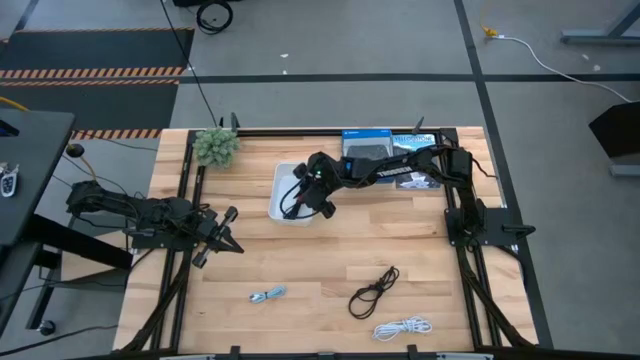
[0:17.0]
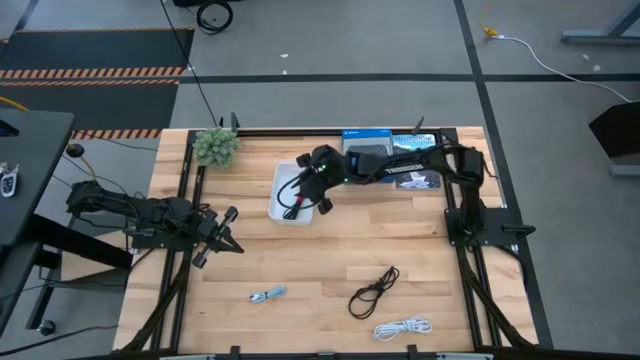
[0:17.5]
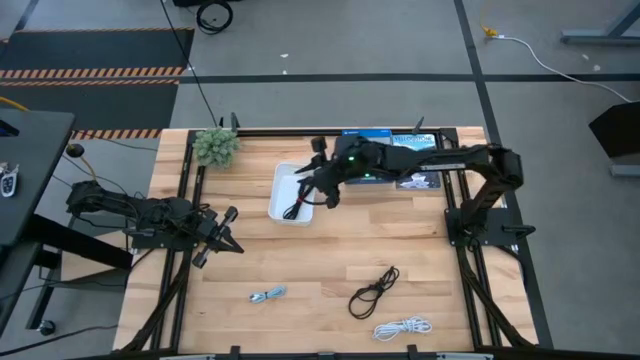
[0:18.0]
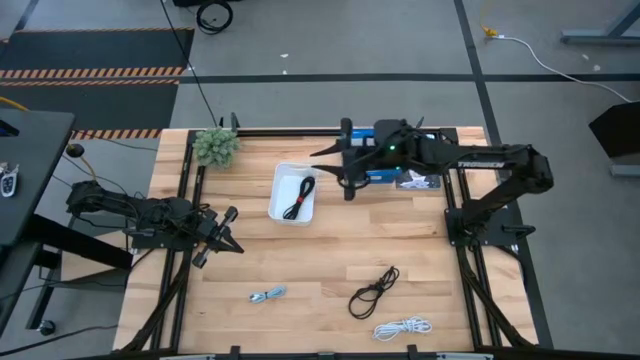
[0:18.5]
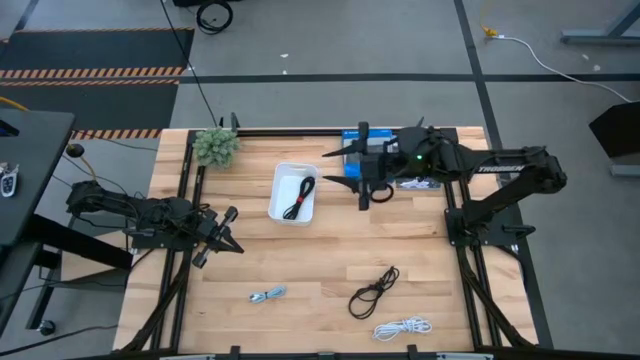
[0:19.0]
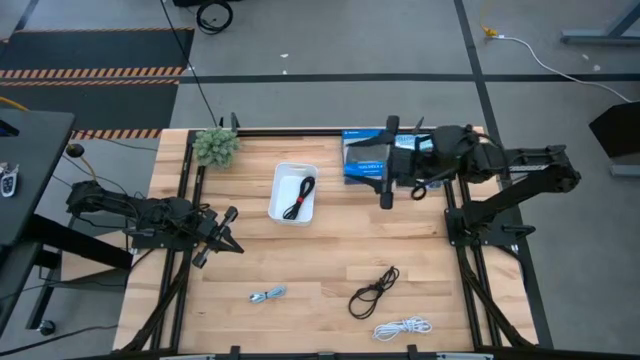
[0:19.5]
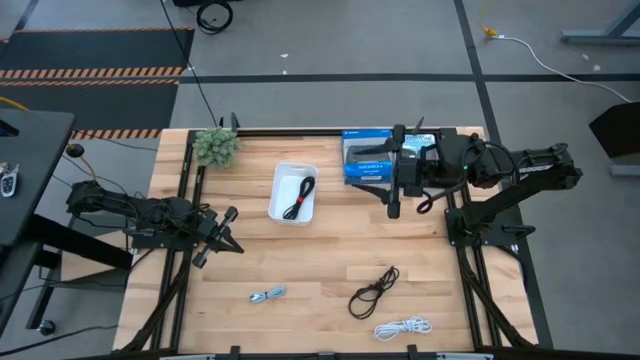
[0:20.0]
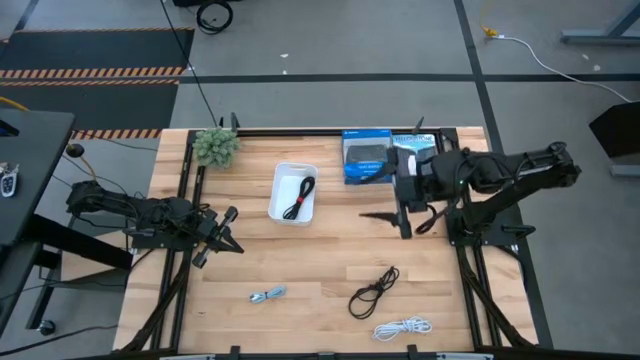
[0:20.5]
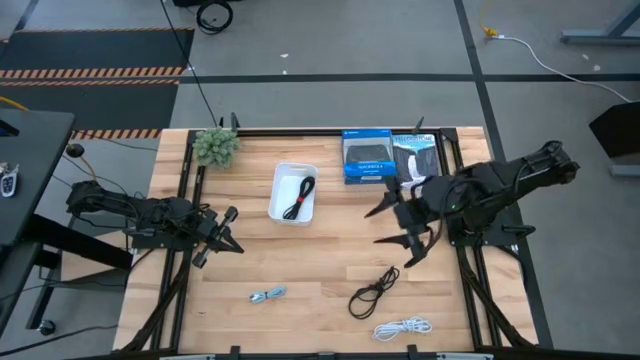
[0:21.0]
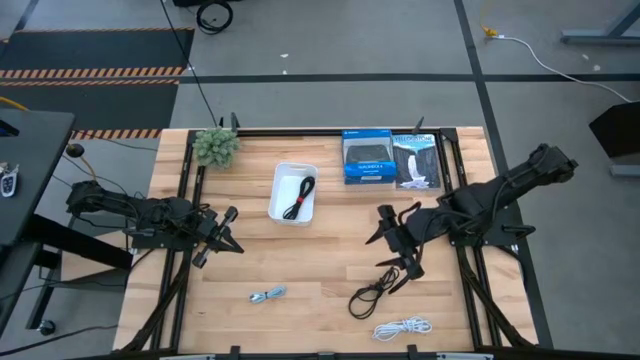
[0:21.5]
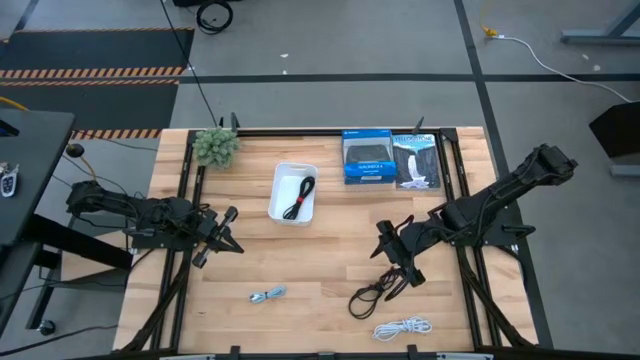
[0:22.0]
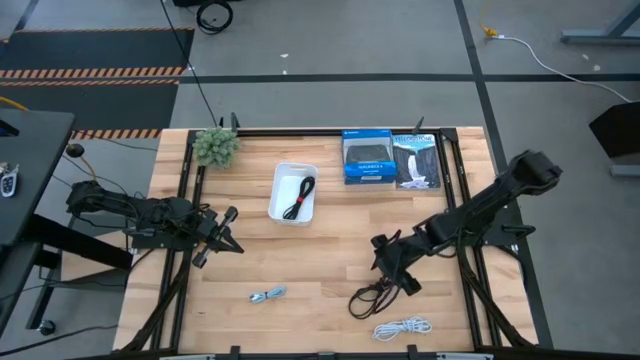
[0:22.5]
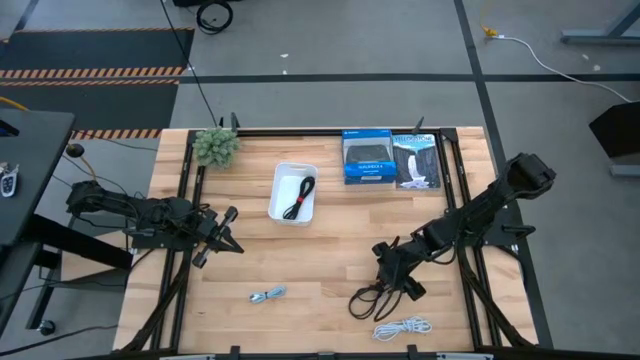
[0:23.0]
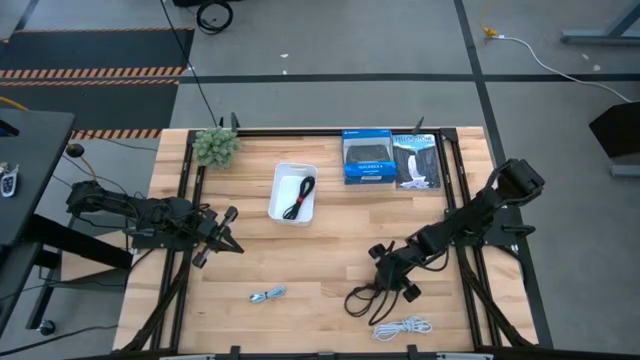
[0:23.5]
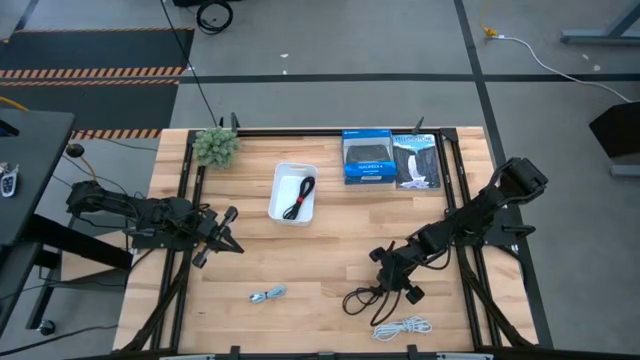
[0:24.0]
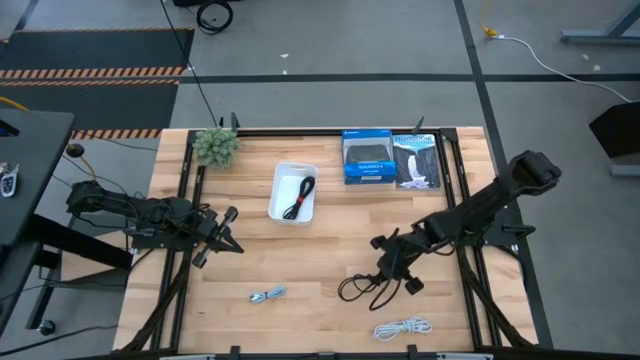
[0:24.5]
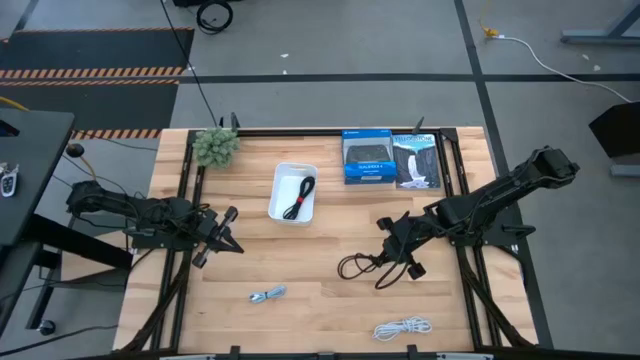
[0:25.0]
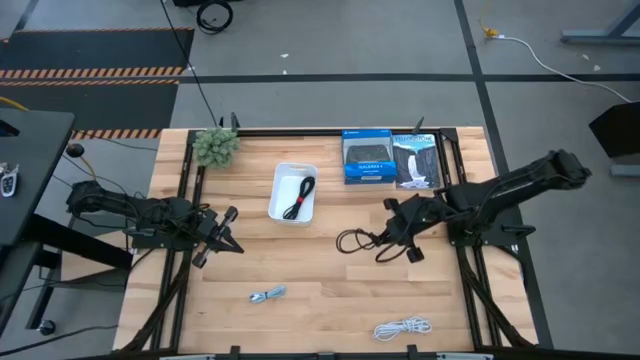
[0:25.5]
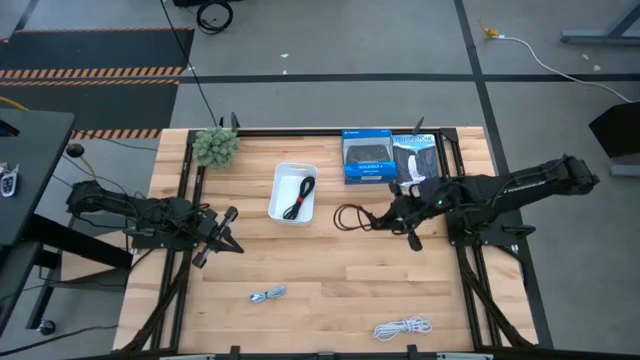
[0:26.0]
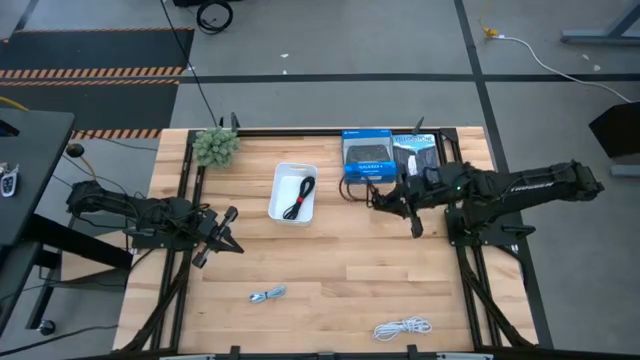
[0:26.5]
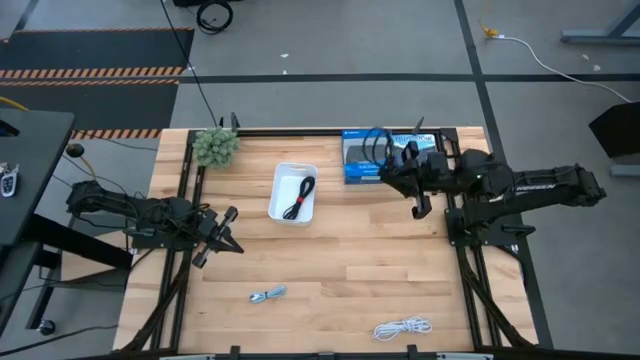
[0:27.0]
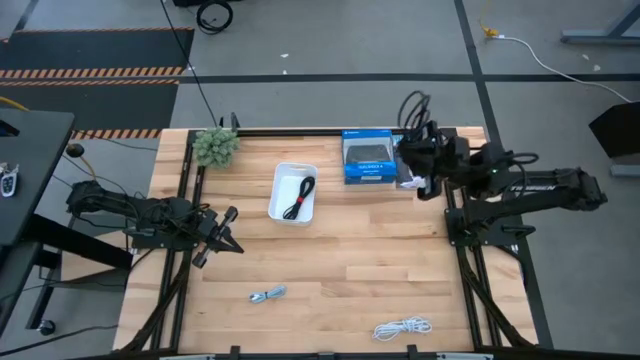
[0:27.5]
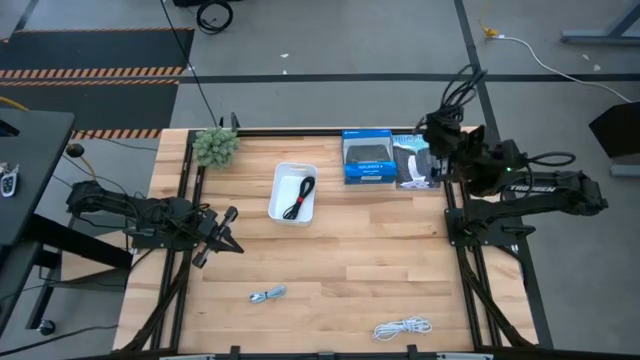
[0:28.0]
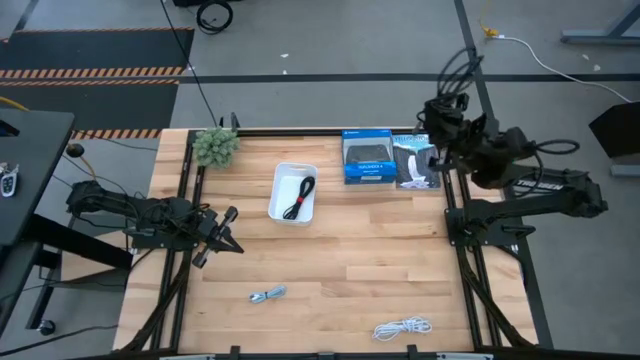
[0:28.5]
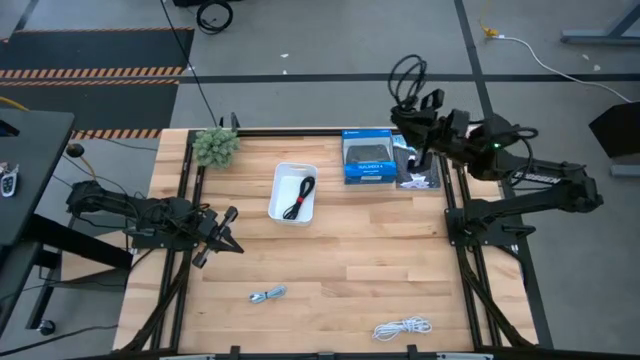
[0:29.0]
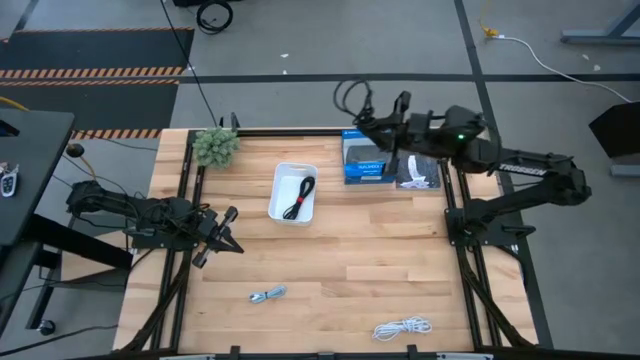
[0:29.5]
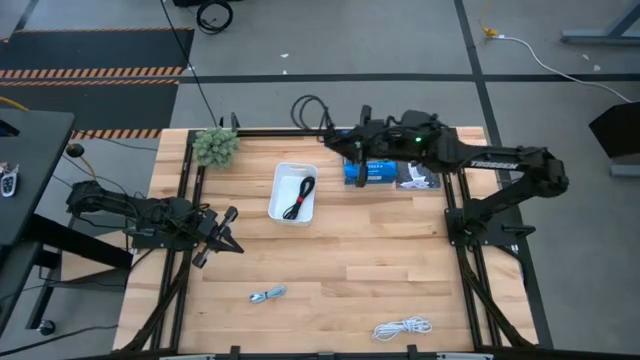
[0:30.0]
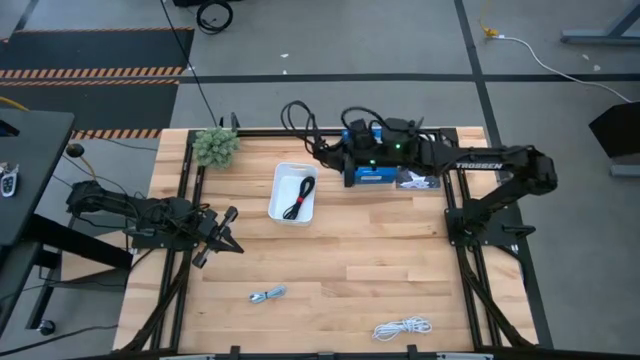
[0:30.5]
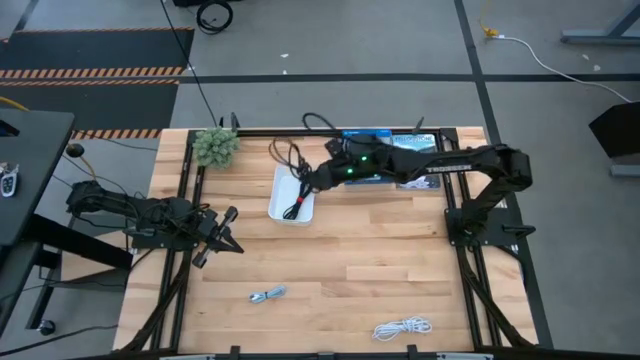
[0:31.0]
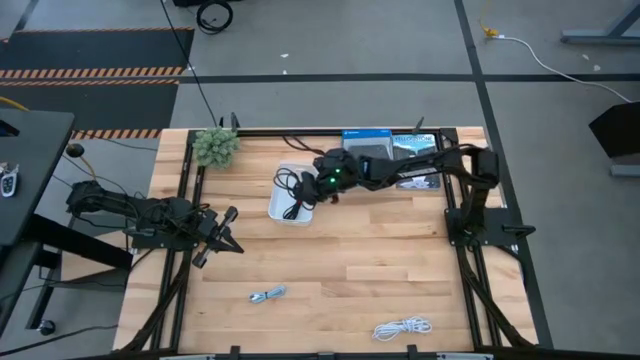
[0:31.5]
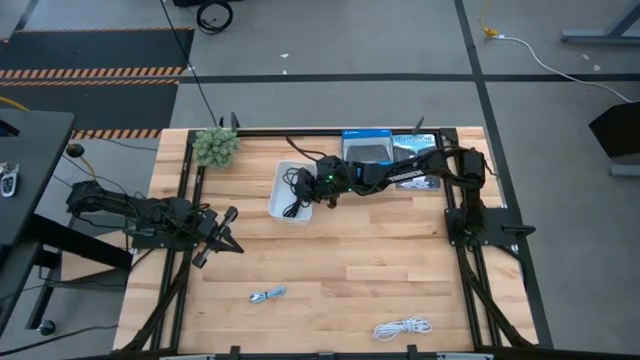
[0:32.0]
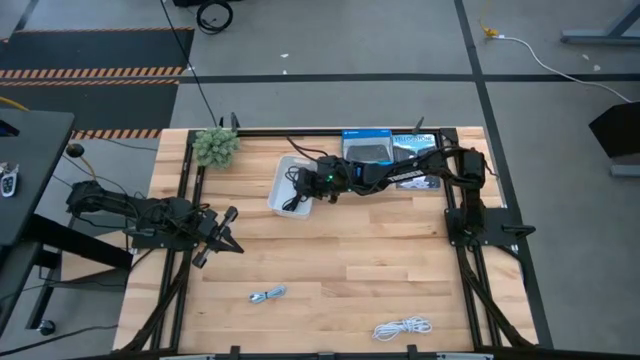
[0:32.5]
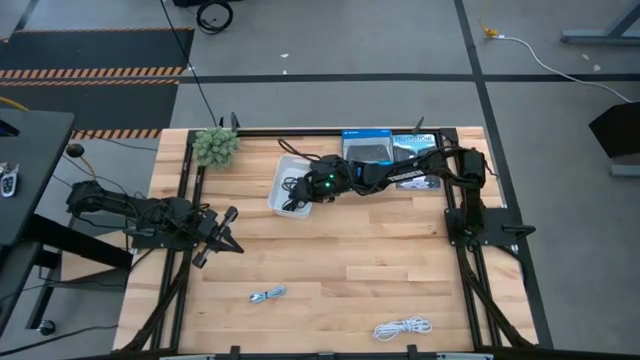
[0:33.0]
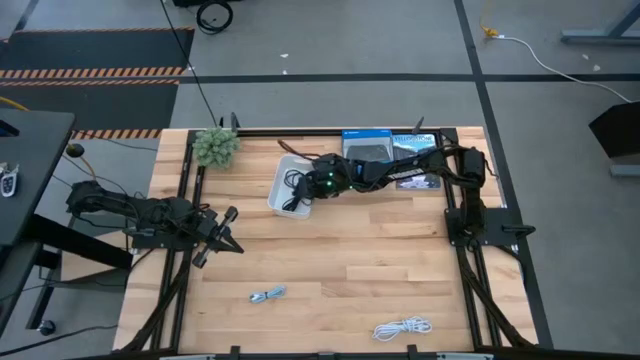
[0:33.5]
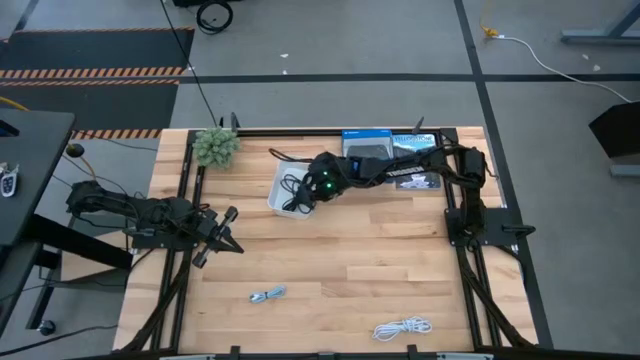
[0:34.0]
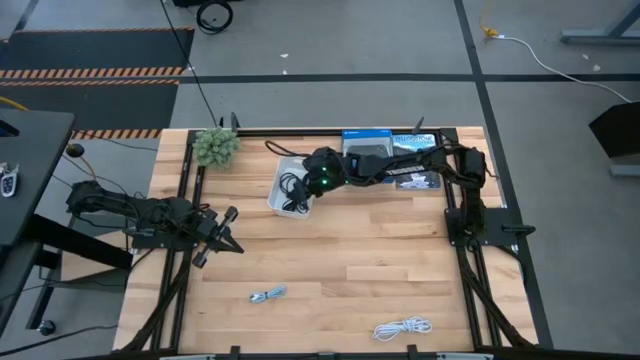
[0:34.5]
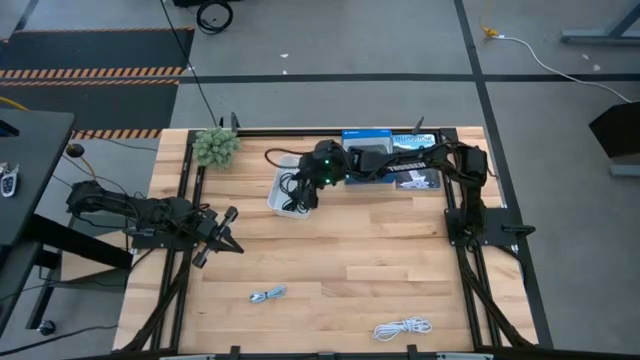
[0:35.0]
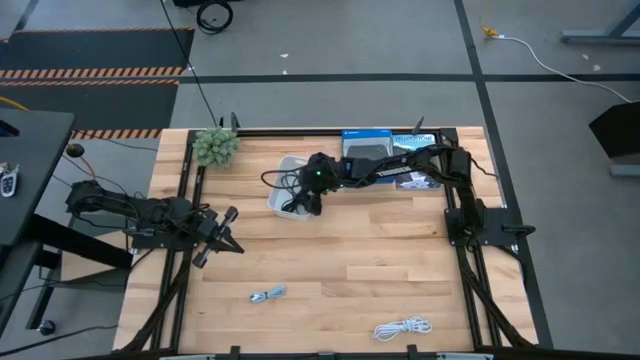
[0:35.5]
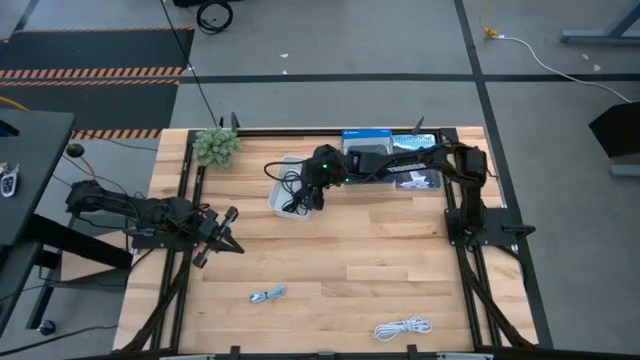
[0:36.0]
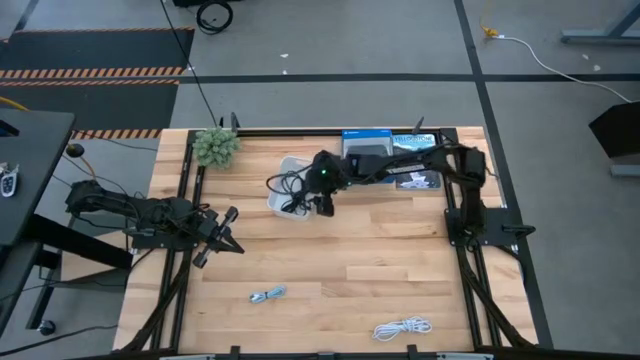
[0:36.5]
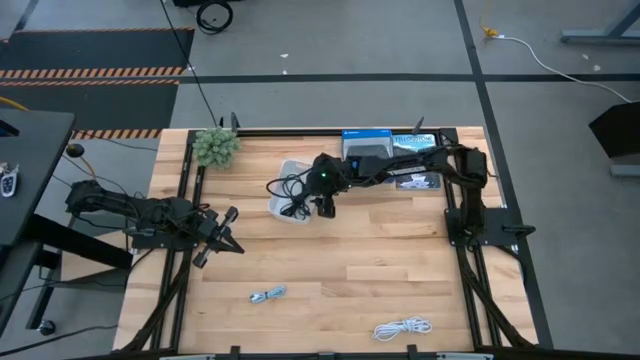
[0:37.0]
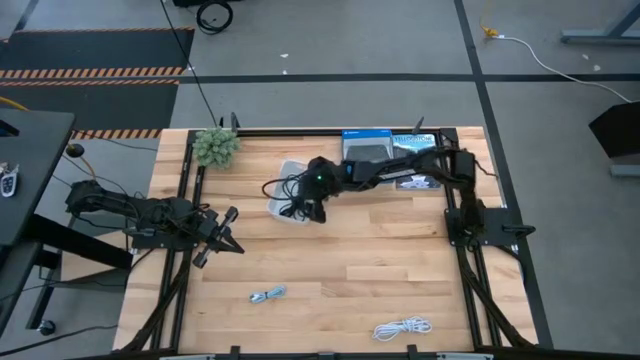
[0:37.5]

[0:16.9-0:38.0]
Task: Pick and place USB-C Cables
Put the black charger cable into the white bin
